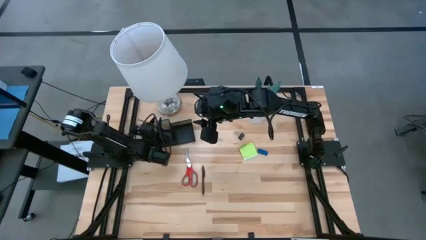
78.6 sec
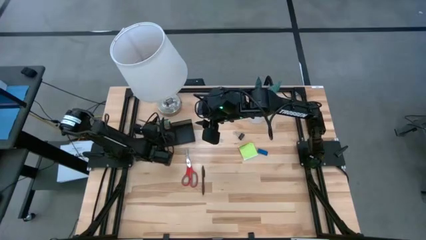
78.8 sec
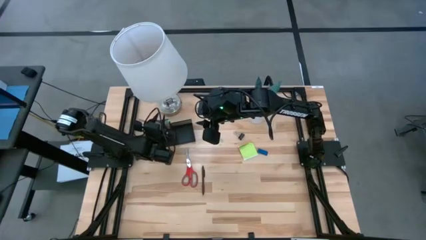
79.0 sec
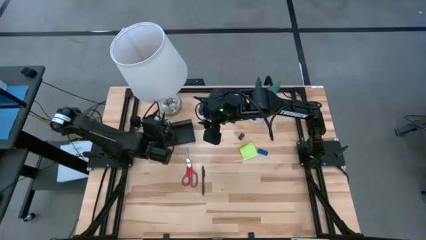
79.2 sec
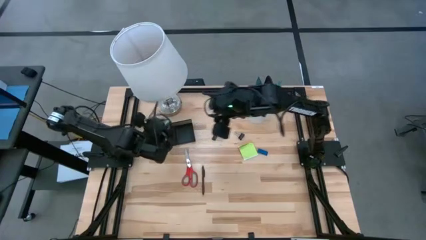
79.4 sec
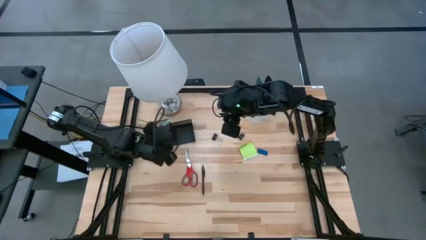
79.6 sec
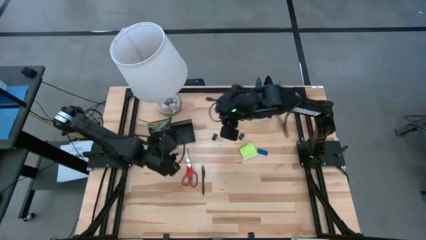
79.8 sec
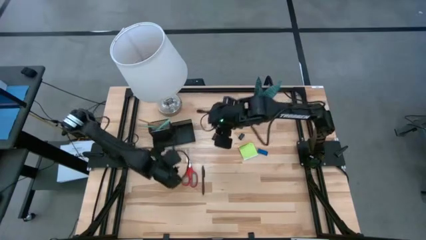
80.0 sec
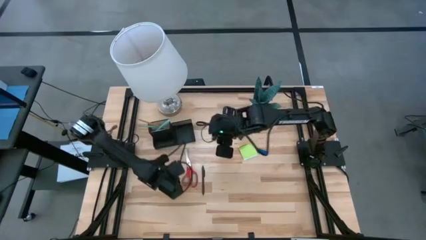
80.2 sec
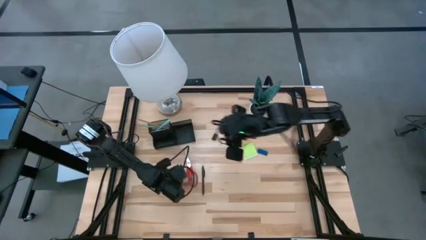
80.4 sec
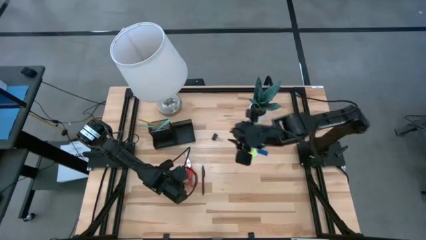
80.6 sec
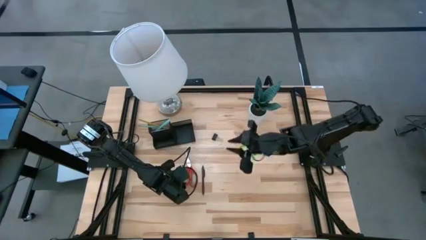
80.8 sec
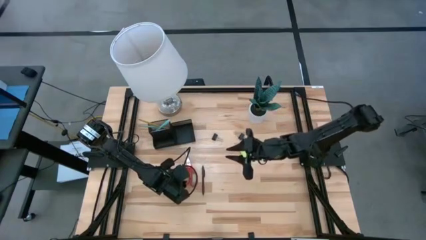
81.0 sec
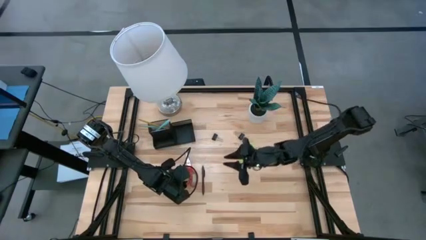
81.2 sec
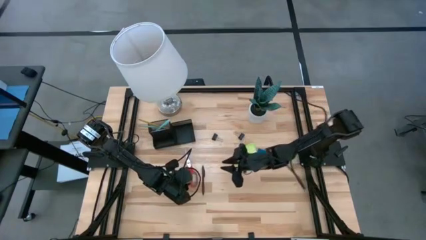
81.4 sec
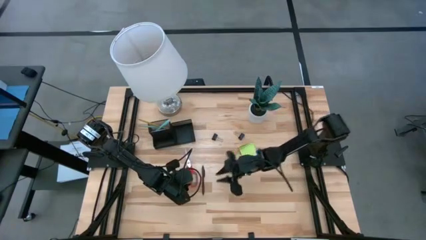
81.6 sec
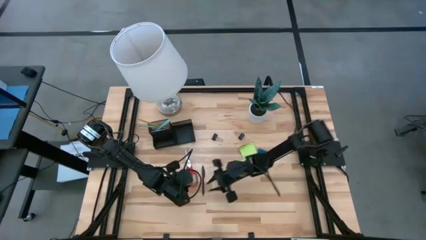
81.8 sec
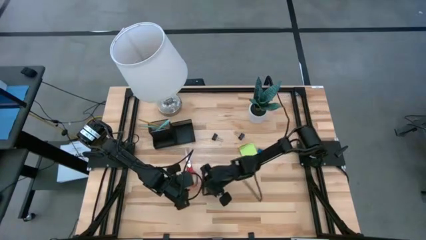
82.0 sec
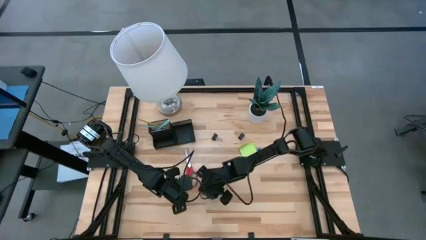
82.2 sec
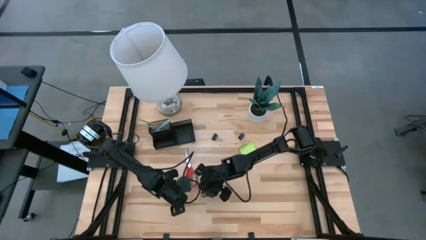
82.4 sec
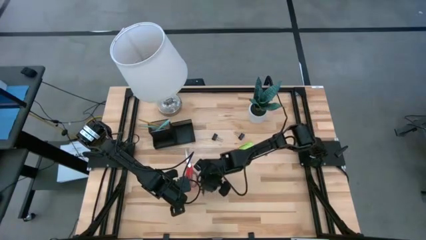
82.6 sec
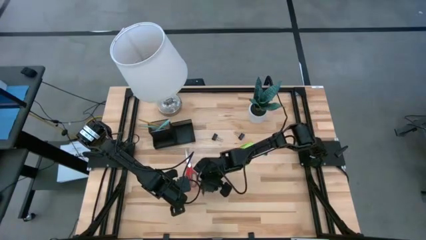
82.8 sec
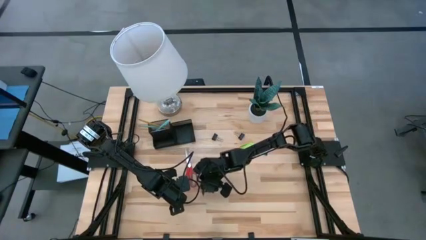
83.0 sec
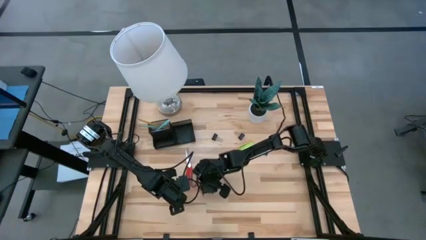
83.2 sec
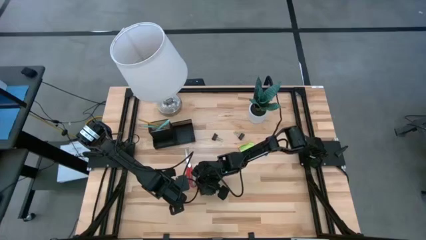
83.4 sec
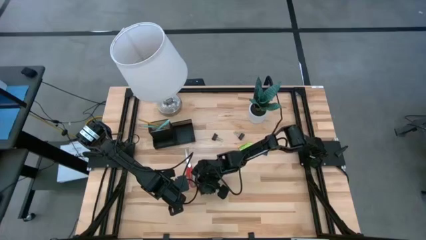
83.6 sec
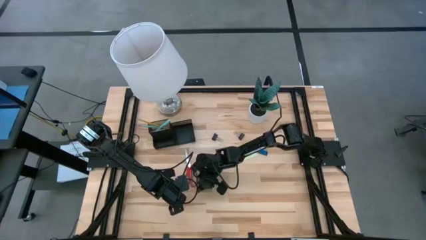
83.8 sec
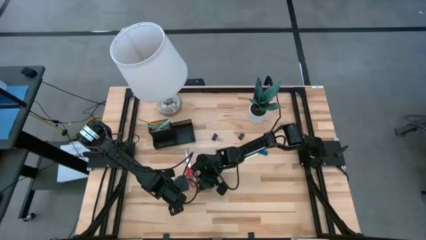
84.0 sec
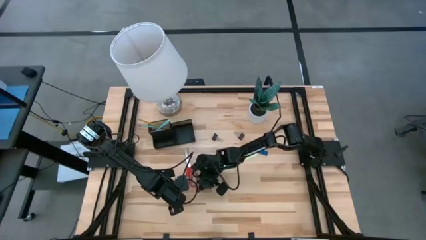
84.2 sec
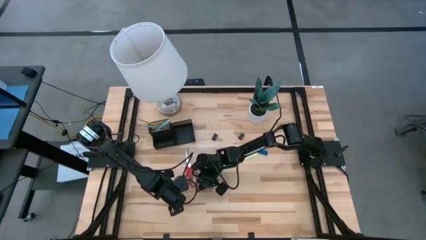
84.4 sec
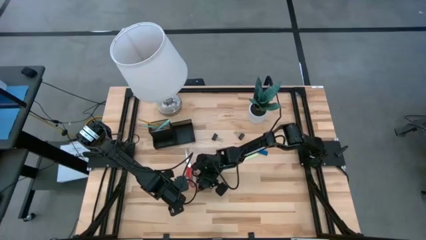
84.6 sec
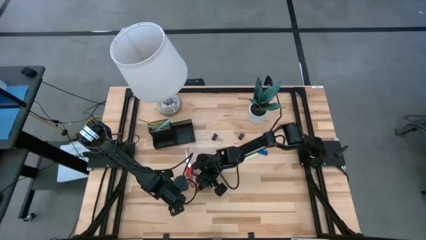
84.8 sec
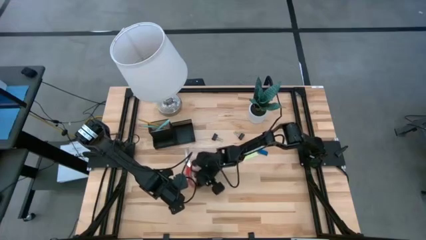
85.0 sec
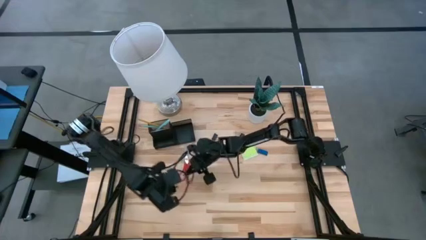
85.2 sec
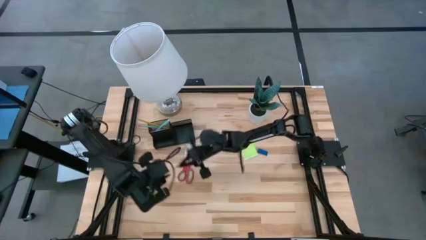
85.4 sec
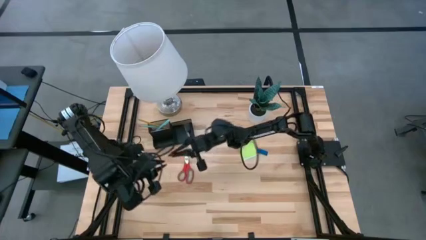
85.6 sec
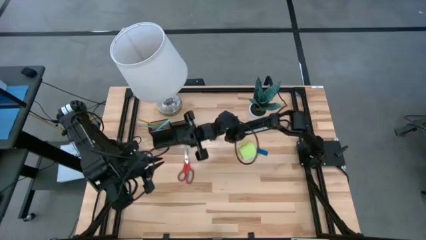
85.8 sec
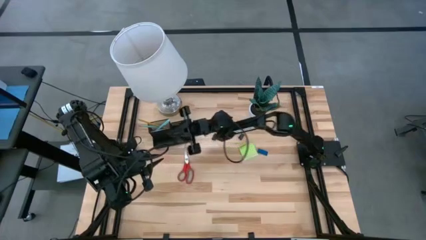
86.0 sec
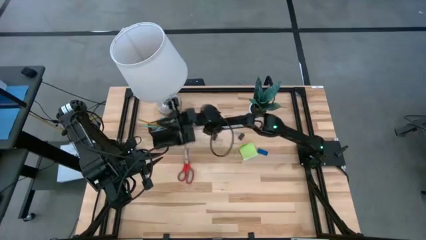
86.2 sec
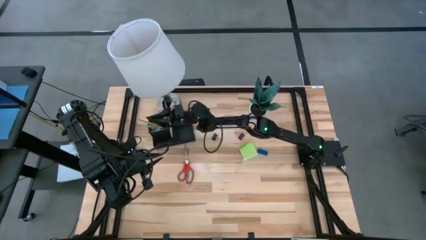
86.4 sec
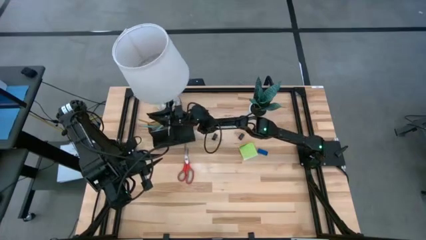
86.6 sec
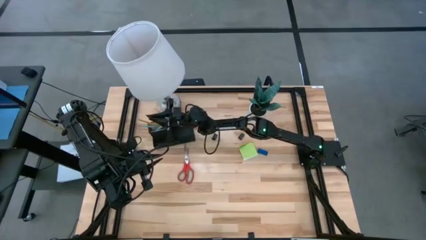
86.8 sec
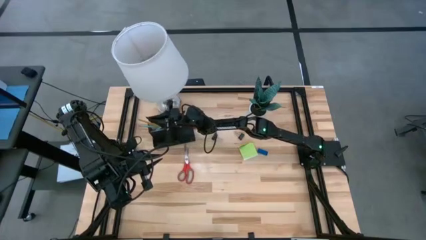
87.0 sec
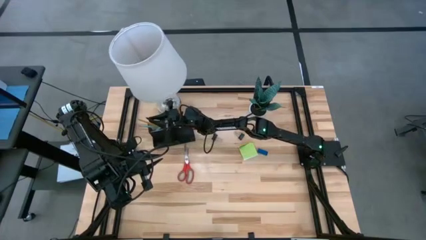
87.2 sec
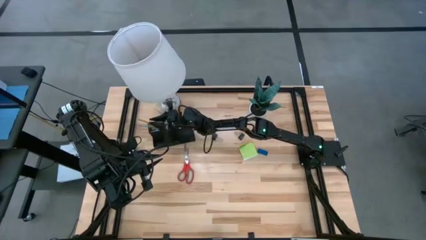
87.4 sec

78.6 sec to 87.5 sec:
Task: Pick and place office supplies into organizer
Put the brown pen into the black desk organizer

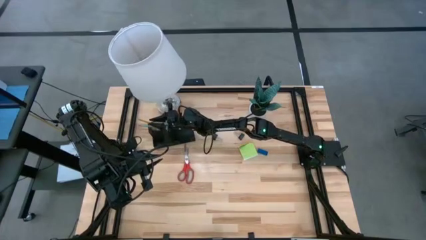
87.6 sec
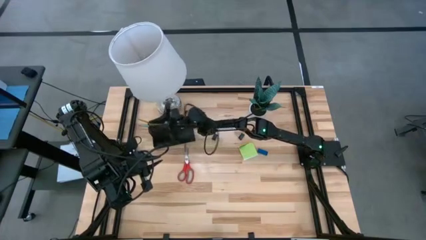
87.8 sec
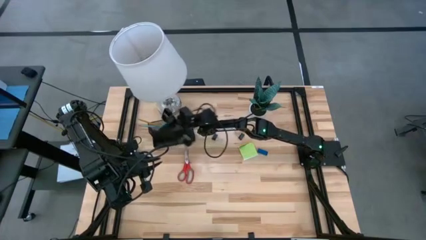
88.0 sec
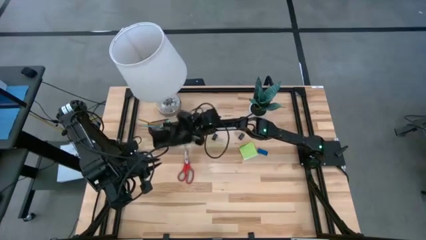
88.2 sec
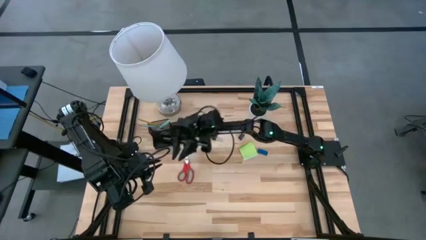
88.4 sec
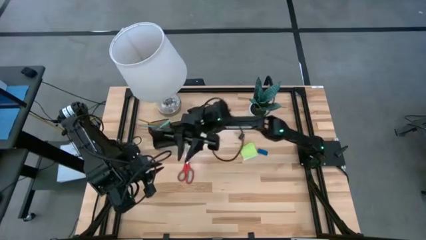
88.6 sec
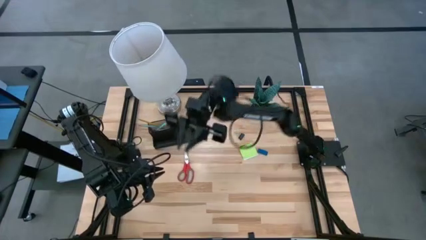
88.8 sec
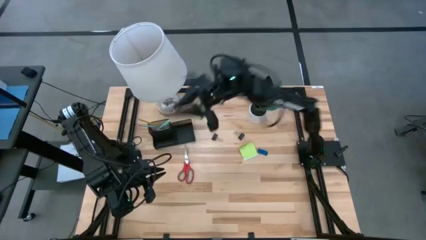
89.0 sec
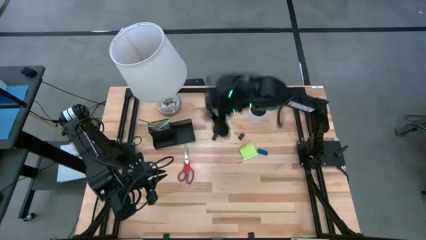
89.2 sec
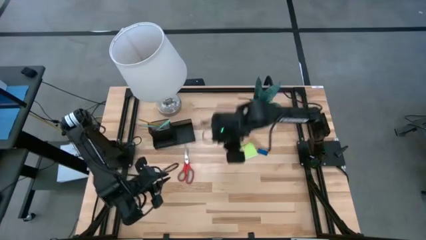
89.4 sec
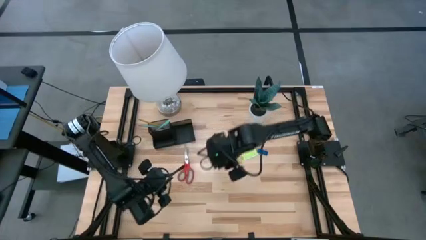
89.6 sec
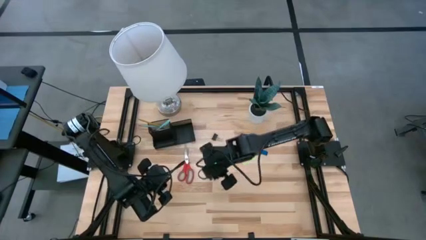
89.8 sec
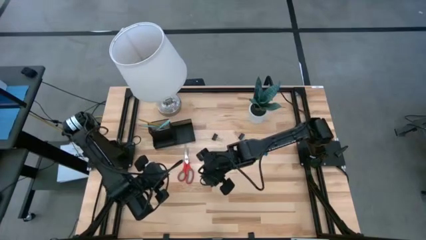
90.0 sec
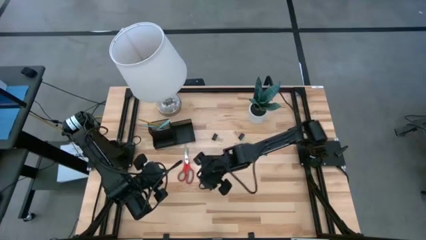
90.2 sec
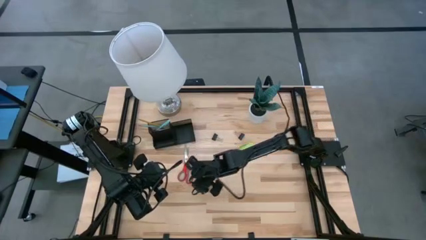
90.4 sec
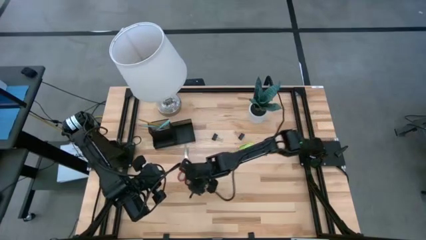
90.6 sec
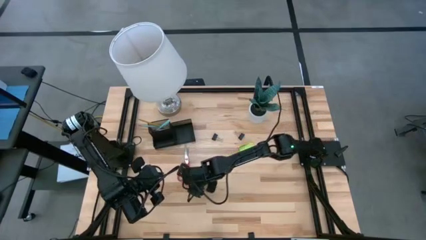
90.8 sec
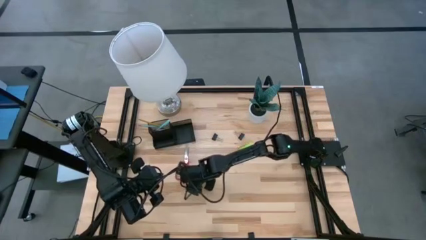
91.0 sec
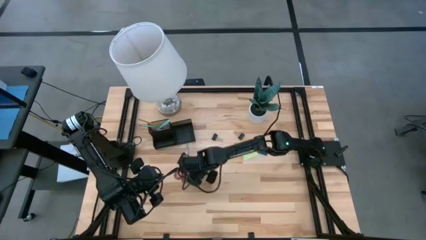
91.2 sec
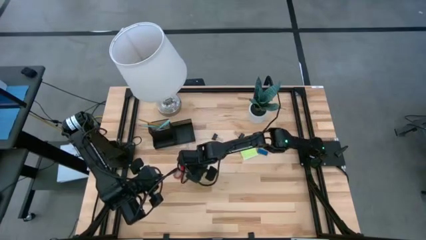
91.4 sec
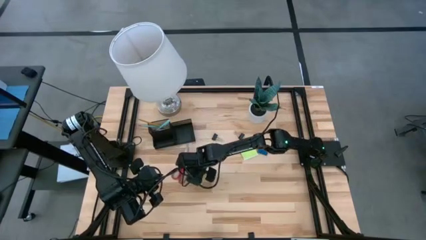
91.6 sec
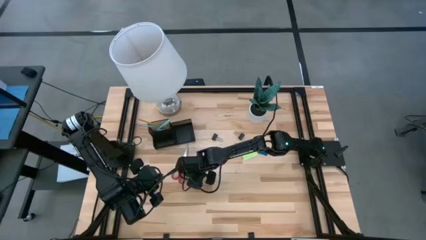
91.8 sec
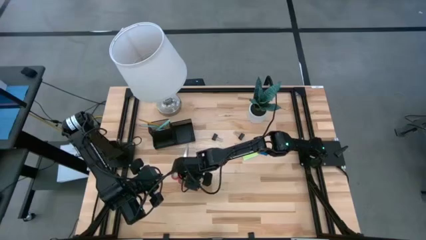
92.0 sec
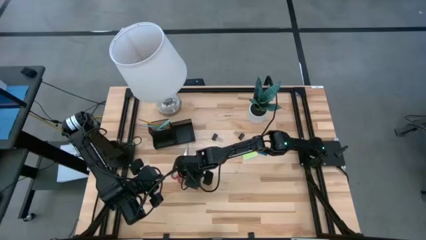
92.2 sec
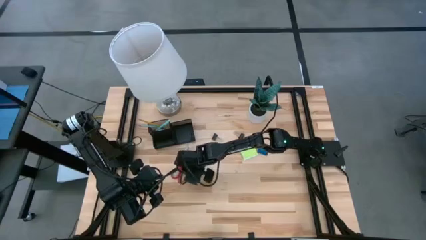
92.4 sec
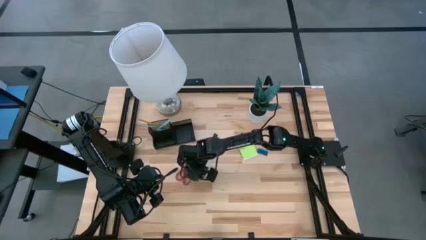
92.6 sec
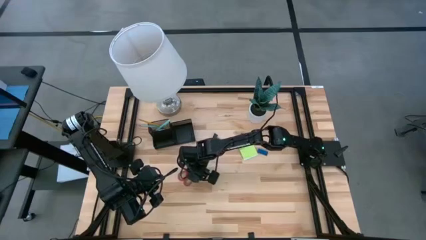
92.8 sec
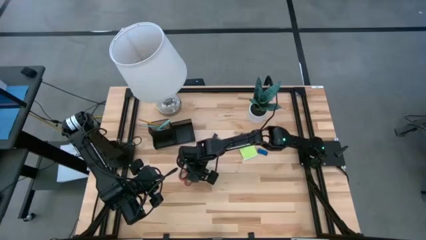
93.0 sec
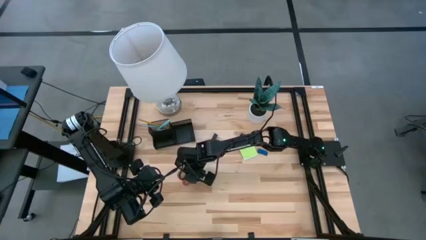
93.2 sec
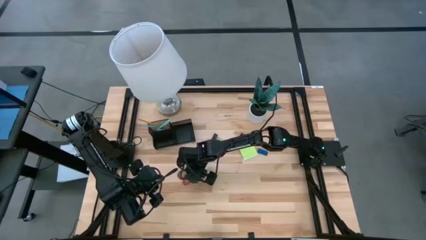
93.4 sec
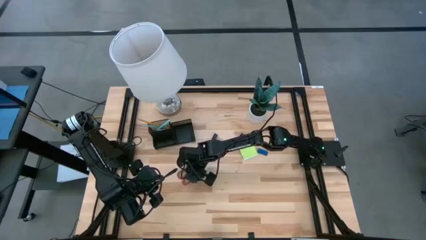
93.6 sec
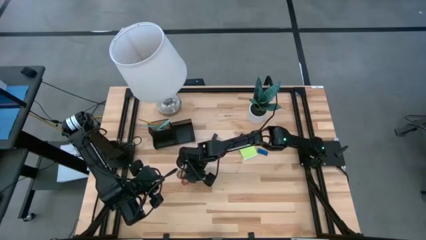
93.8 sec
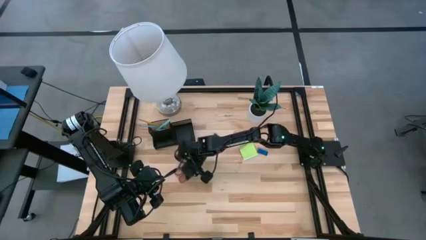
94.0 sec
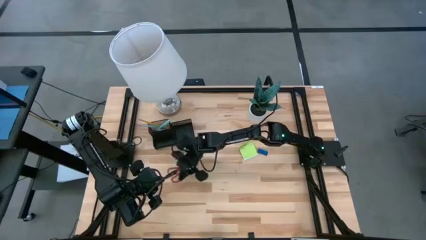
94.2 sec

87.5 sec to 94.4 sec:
Put the red scissors into the black desk organizer

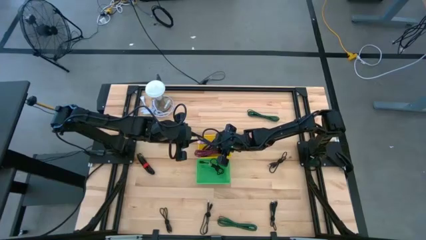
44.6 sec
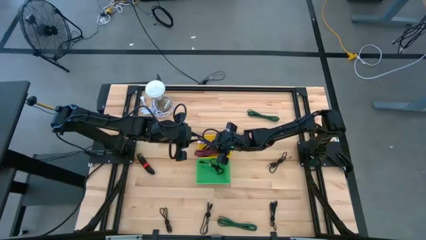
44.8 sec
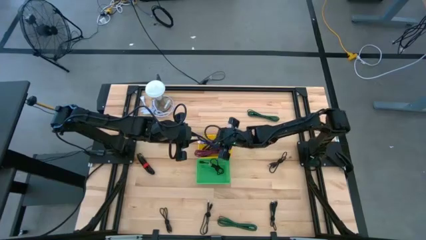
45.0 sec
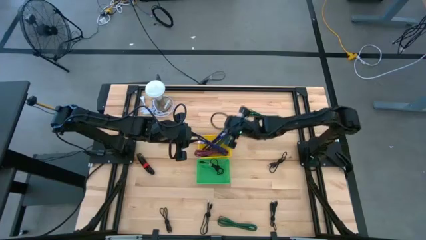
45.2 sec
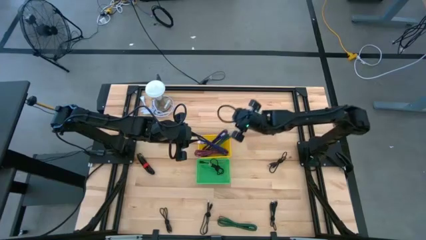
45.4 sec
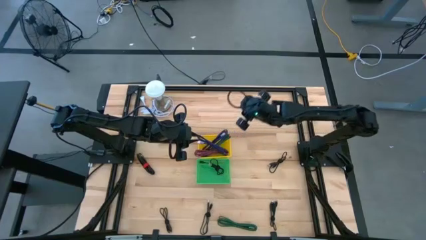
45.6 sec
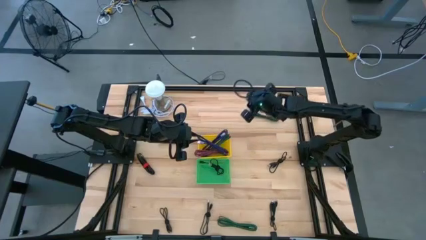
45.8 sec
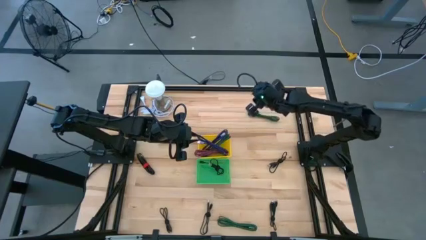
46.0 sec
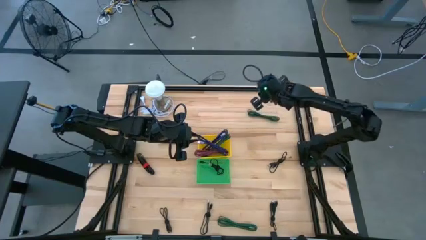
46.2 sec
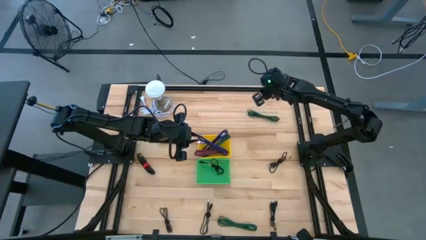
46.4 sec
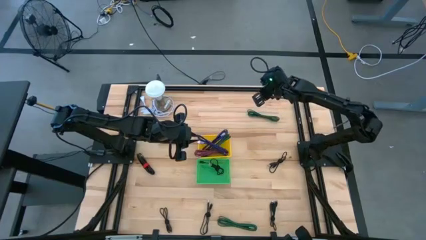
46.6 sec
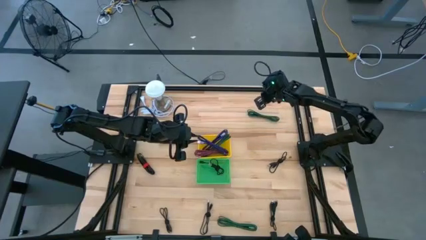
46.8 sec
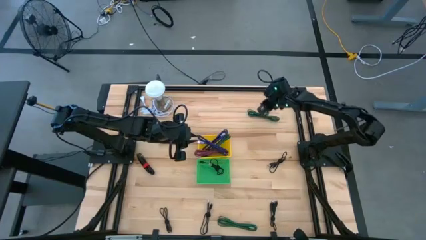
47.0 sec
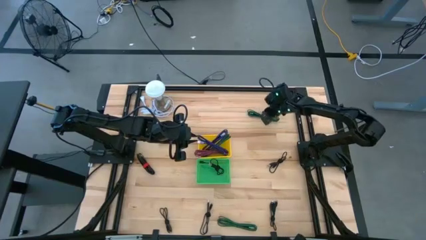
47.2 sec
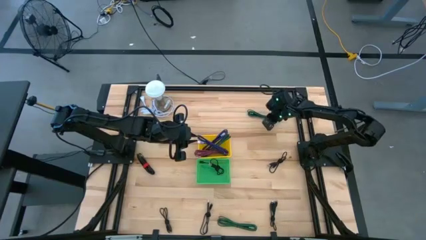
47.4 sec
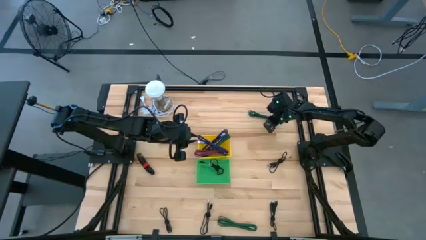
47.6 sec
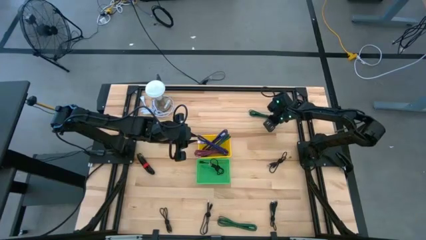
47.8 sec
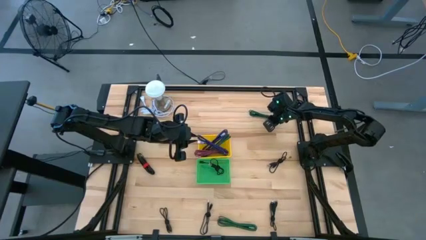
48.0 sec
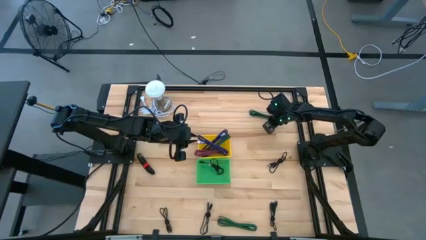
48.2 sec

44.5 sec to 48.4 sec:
Task: Pick & Place USB Port
Put the green and black USB cable into the yellow bin
